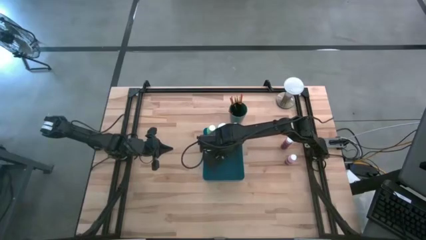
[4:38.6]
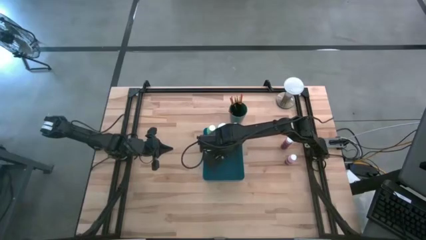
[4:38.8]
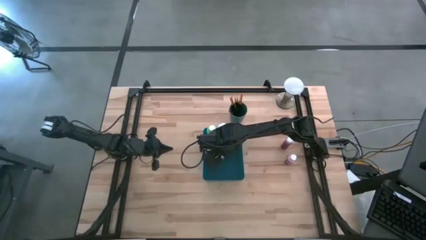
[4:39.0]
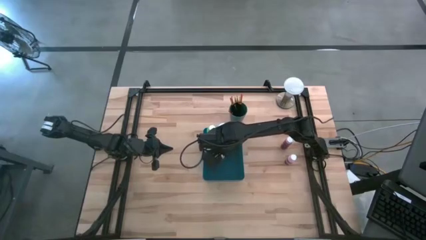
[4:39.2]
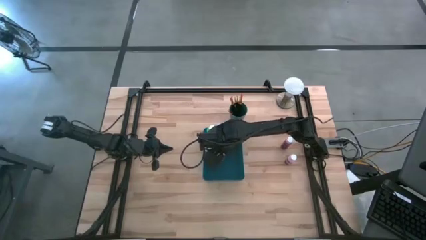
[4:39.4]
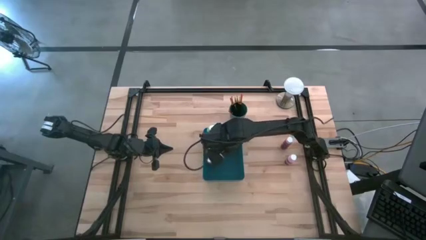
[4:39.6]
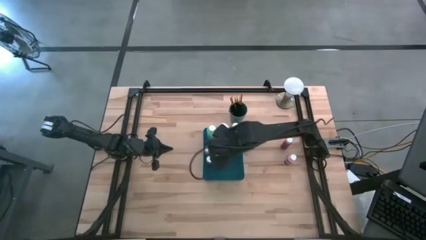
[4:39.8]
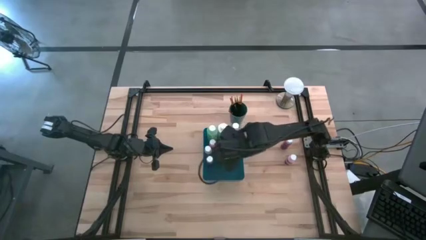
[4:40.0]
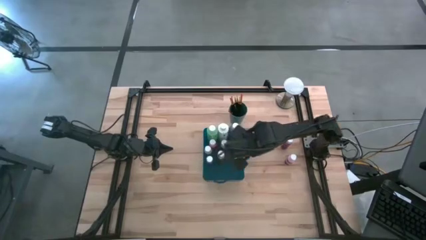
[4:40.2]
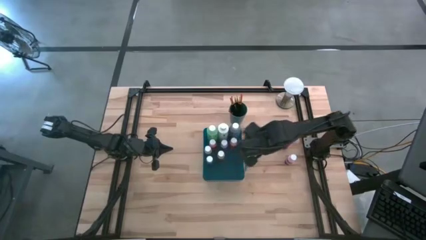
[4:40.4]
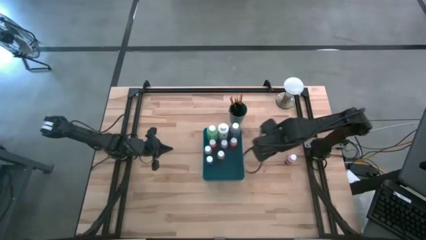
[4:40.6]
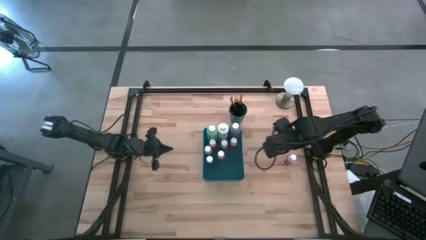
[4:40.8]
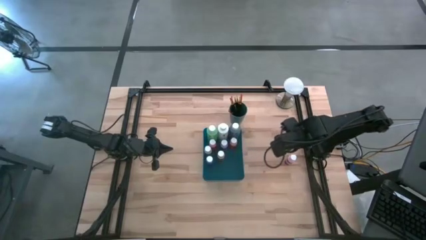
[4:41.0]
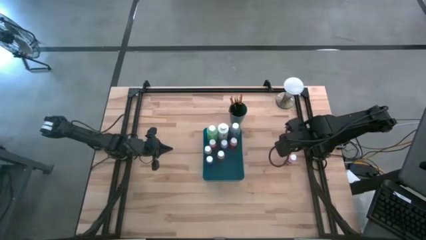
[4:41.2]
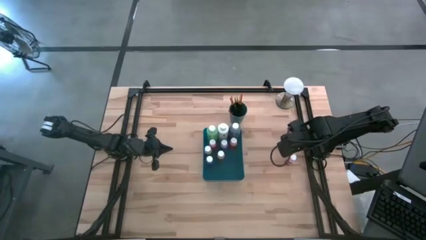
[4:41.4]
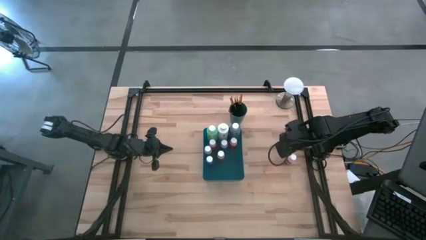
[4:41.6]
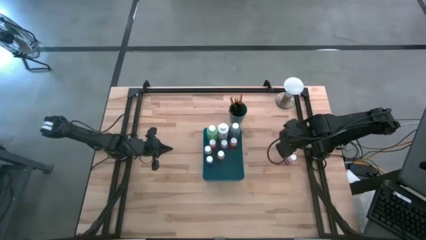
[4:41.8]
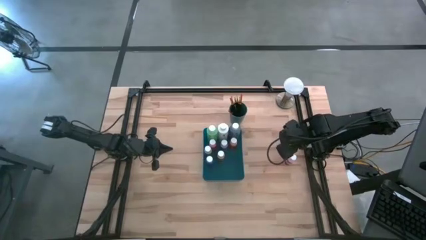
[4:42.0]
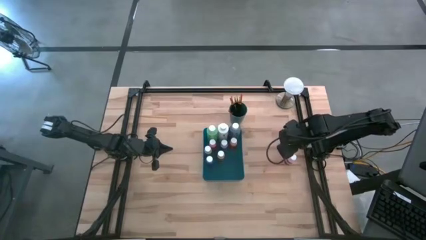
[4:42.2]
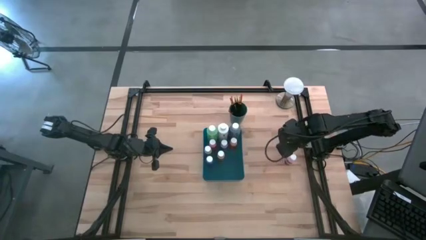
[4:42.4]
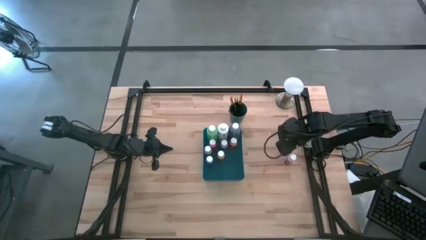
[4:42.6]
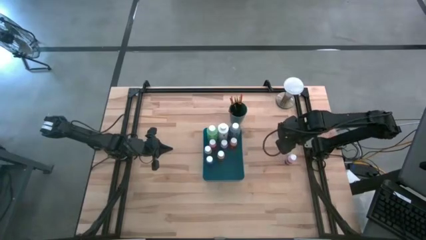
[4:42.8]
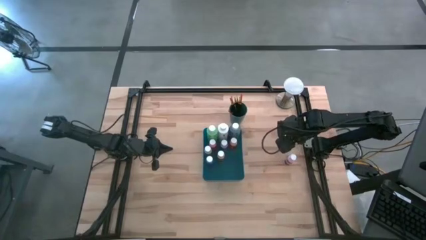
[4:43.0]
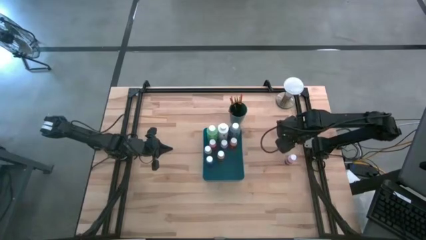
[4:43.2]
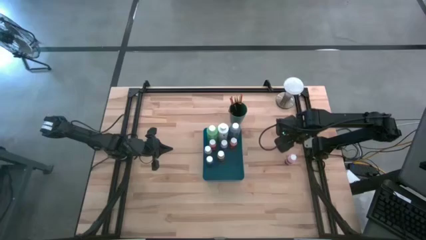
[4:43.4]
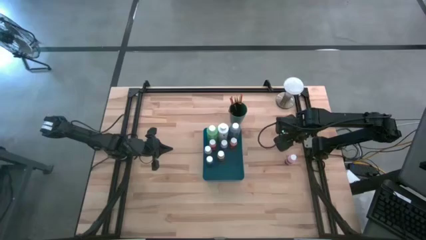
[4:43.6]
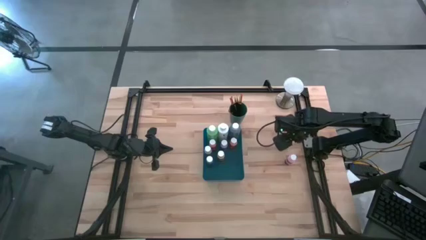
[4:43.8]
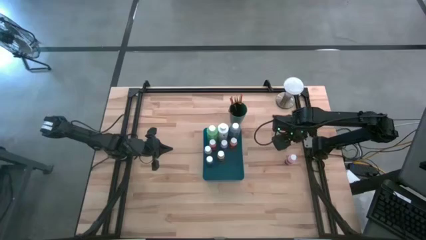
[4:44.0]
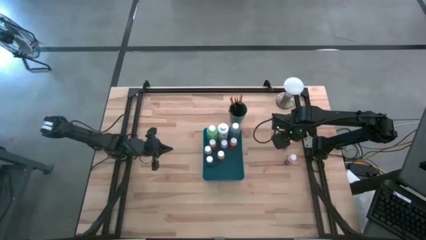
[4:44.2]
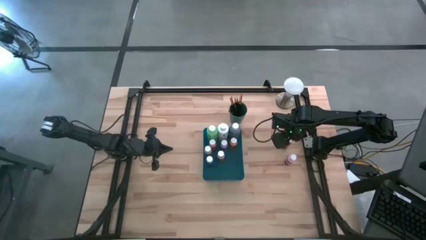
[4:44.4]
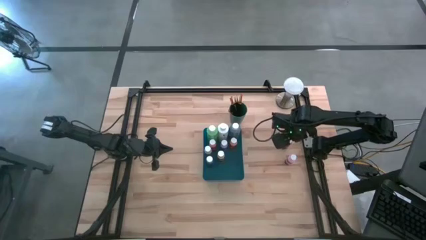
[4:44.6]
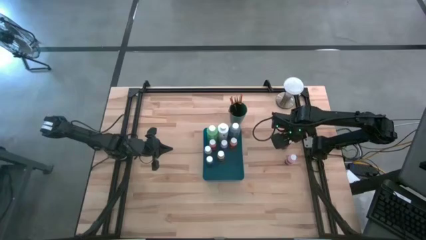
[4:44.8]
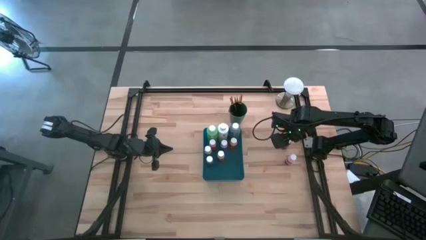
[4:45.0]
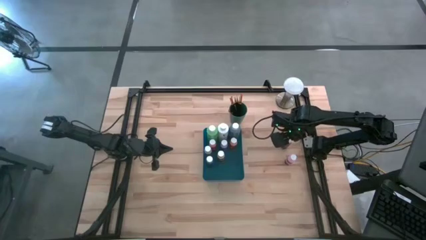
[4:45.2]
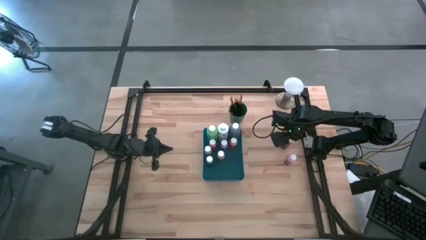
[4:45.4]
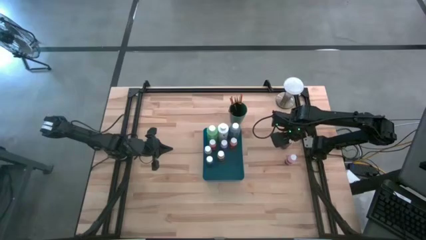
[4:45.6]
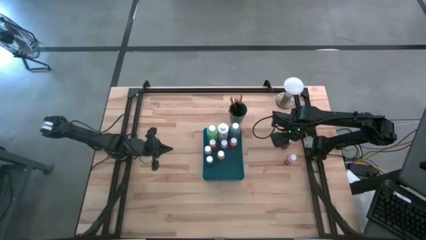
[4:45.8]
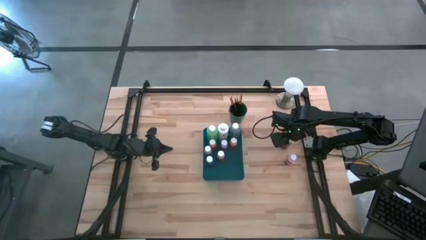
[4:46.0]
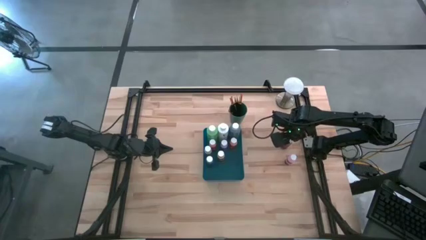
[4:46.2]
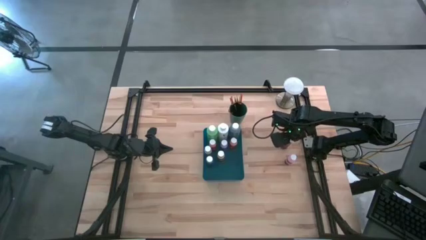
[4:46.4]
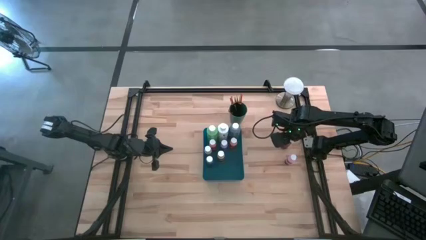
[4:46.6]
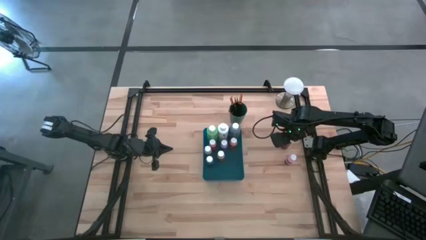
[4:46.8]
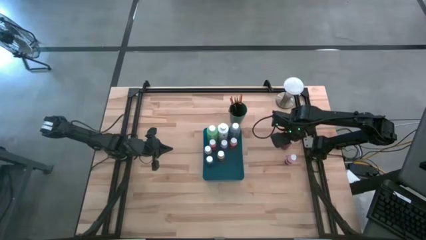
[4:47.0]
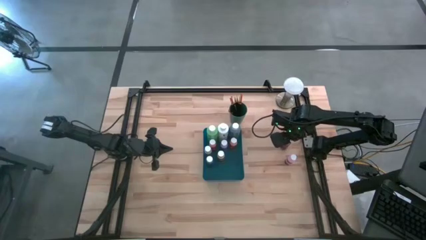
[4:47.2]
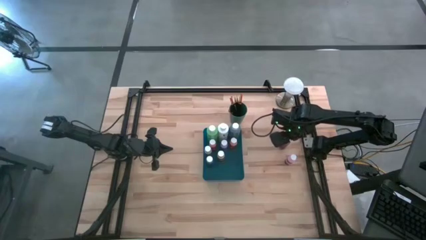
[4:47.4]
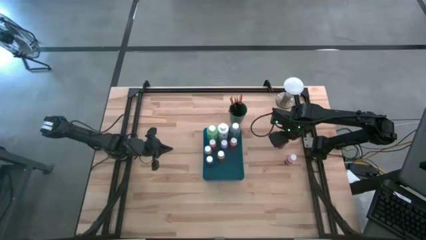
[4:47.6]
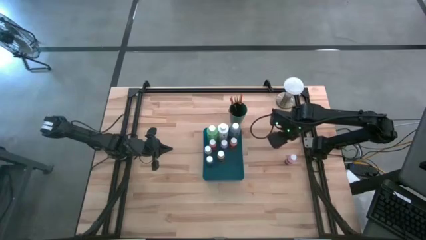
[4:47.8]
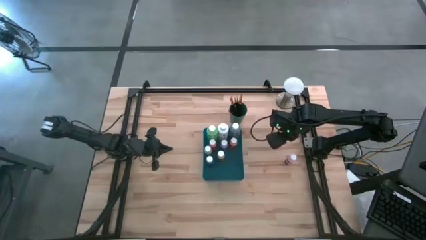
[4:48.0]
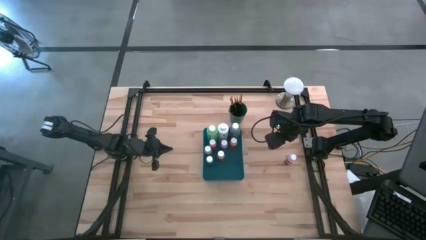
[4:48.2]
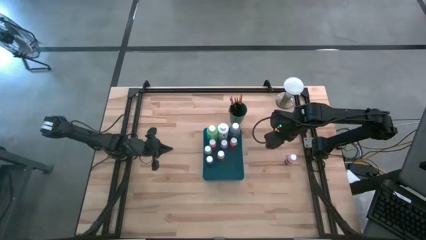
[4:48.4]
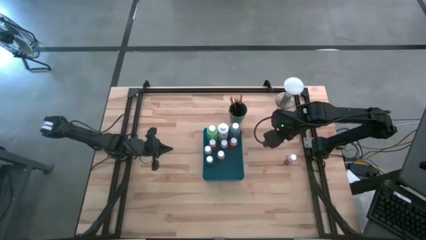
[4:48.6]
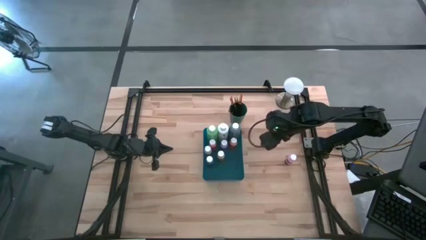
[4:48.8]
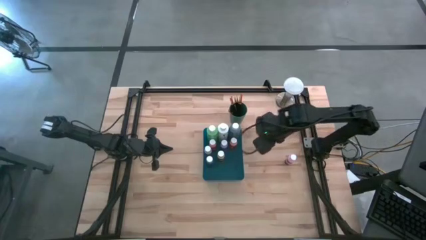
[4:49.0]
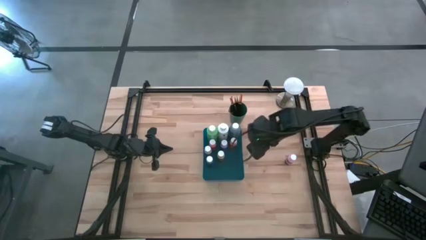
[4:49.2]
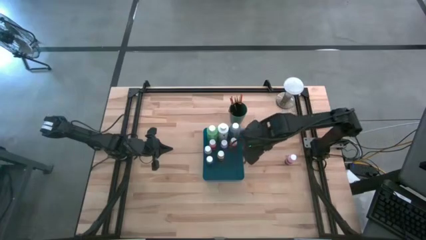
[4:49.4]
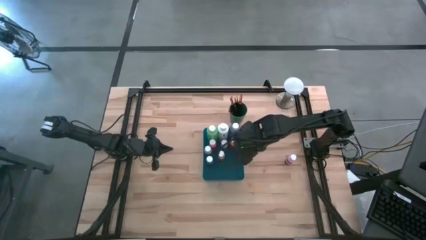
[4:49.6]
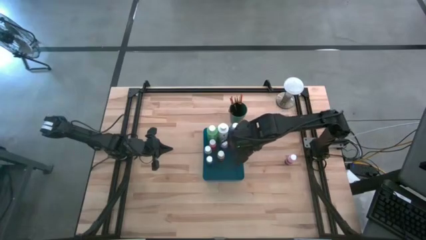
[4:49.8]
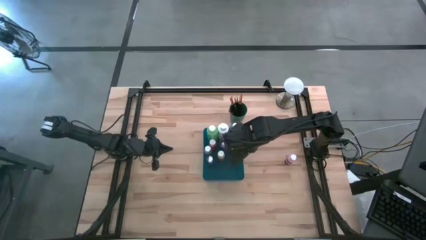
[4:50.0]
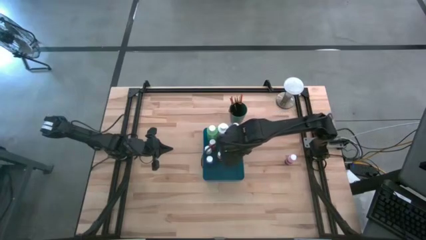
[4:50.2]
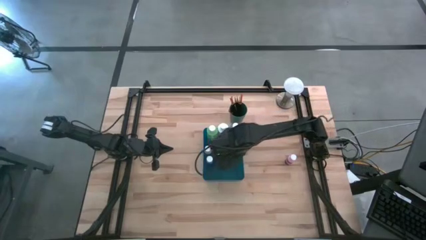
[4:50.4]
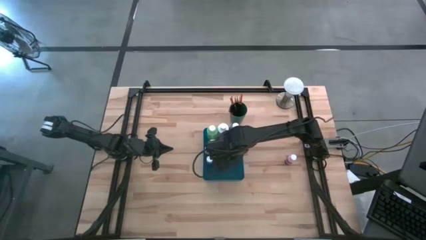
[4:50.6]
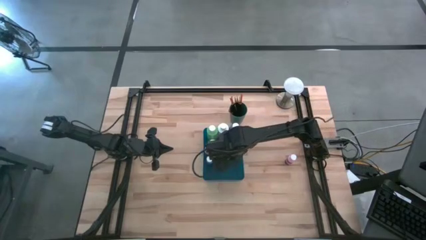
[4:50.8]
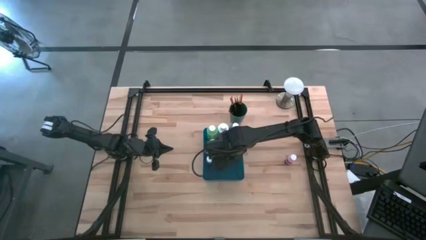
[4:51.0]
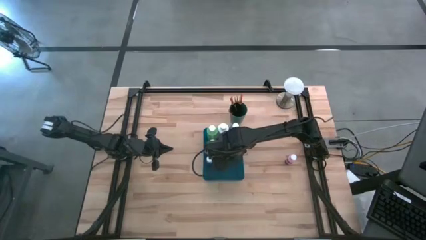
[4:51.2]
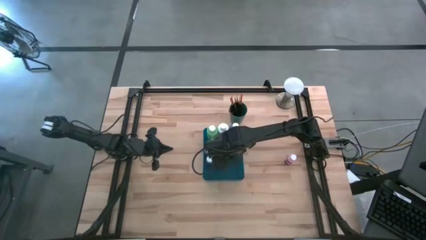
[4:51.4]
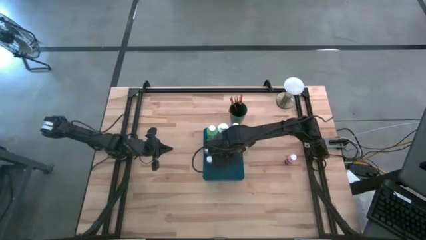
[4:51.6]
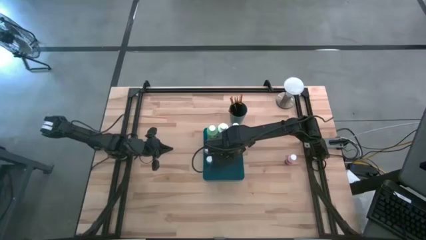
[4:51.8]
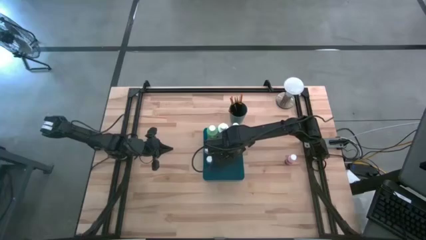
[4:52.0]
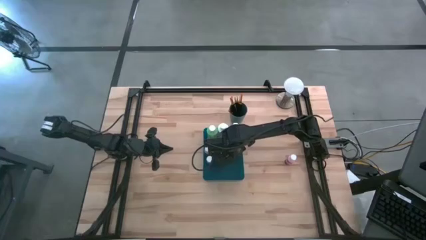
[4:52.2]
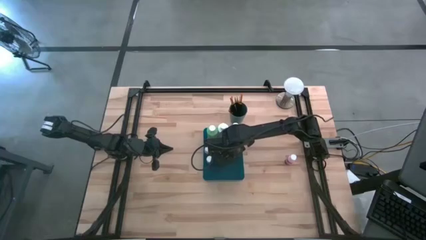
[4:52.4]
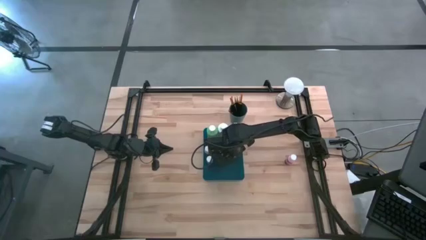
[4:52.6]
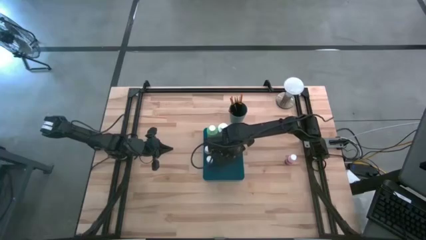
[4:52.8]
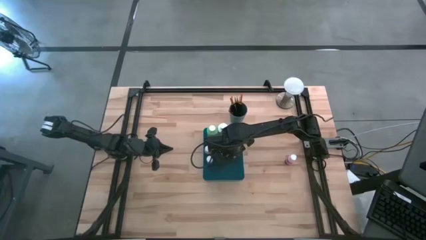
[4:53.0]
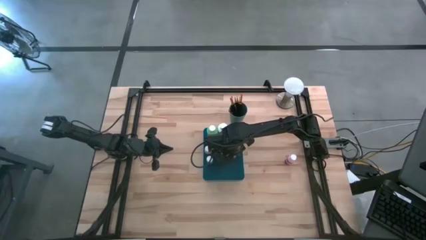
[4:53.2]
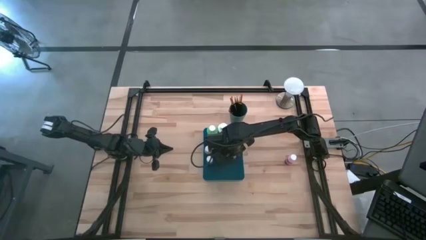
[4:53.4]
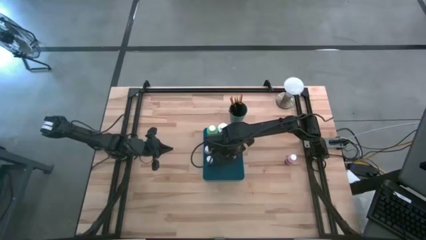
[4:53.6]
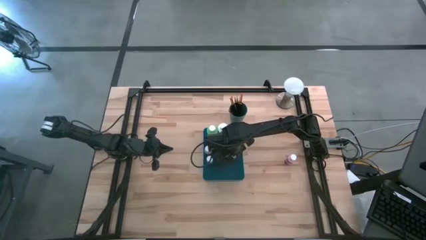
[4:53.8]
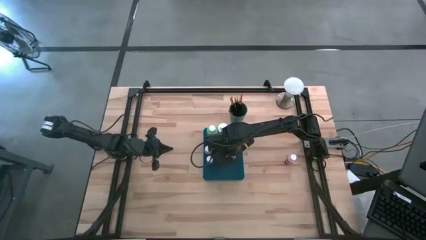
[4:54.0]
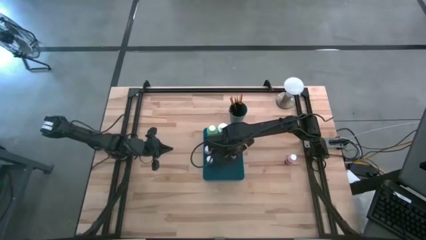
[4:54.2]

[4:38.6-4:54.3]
Task: Pick & Place Paint Supplies
Put the small pink paint bottle into the blue bin

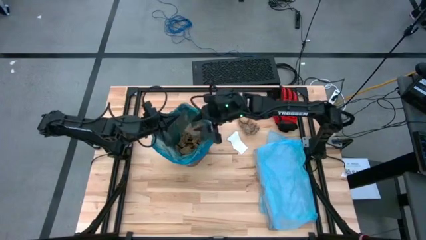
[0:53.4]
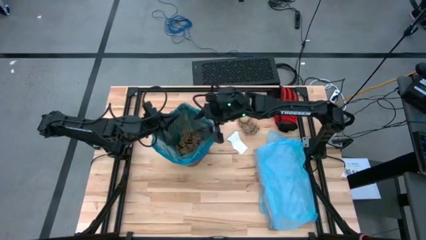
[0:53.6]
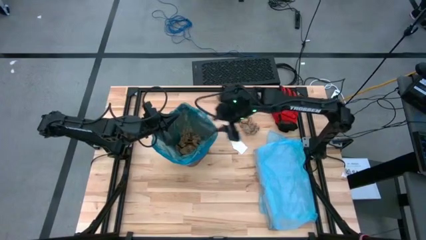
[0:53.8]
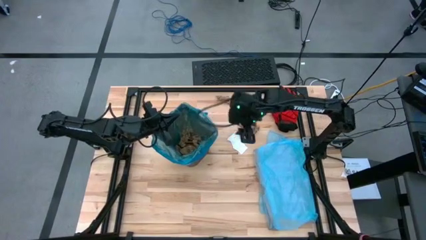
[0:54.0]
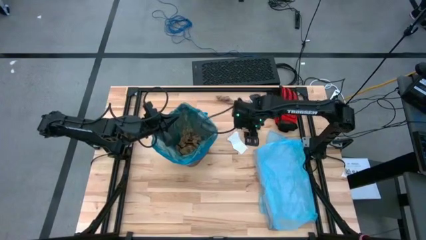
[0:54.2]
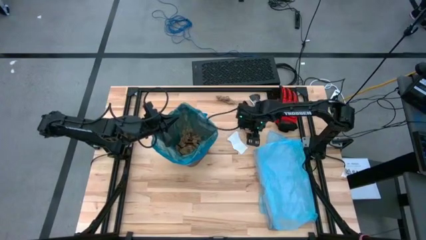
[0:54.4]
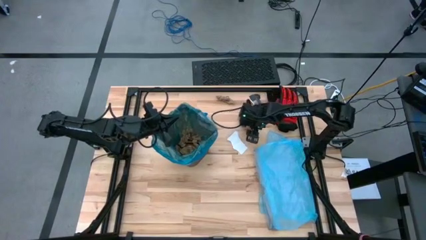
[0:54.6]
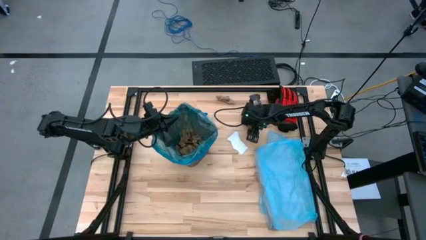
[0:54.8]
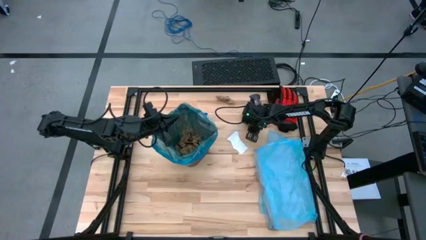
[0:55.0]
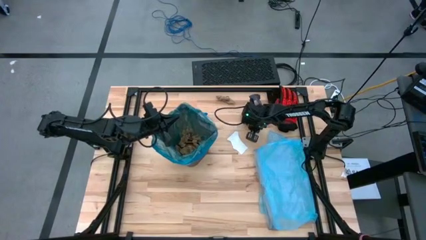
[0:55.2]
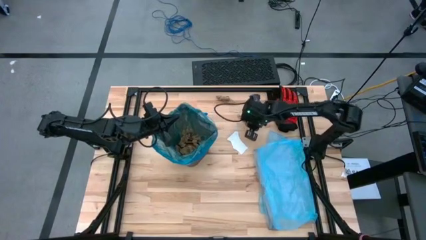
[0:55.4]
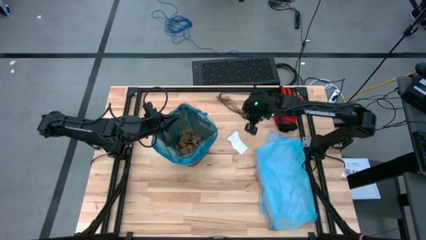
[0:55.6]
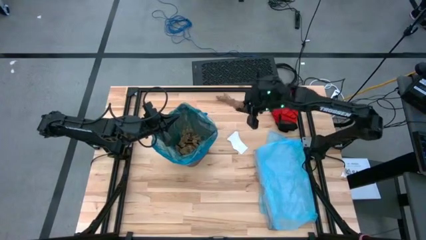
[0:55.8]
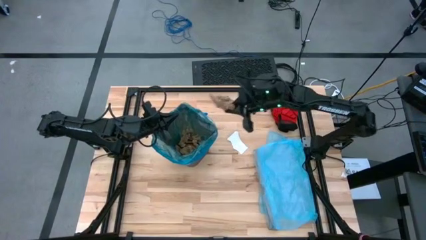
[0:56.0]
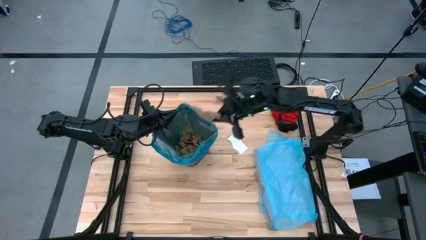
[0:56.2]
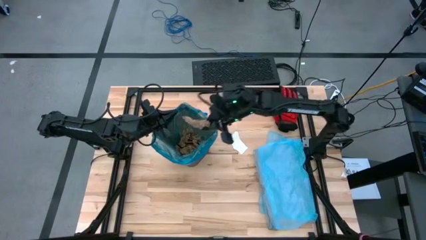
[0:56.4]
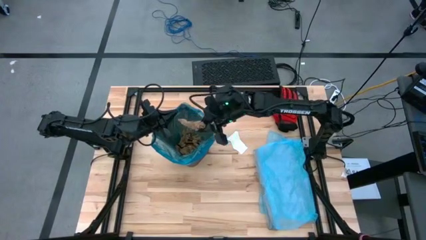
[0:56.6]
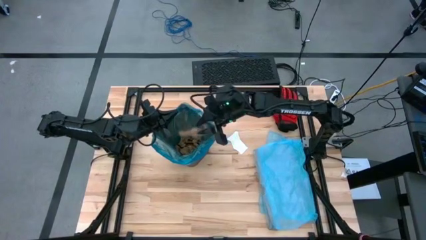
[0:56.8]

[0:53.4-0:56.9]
Task: place trash/remove bag and relplace
Put the brown napkin into the trash bin
